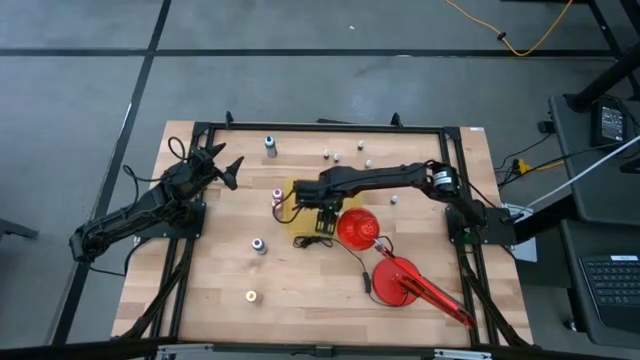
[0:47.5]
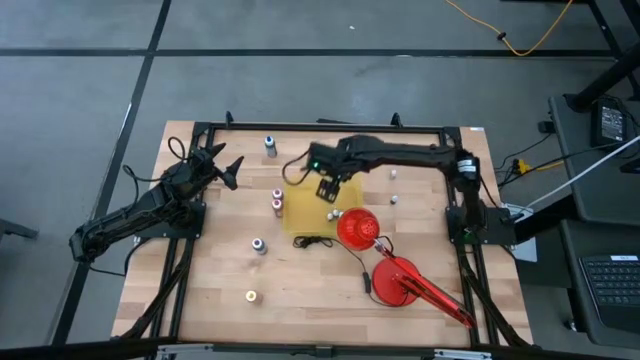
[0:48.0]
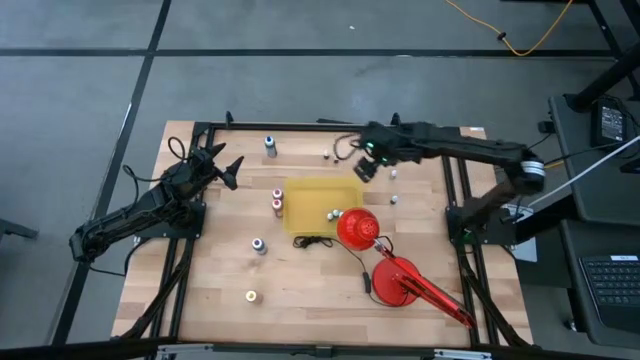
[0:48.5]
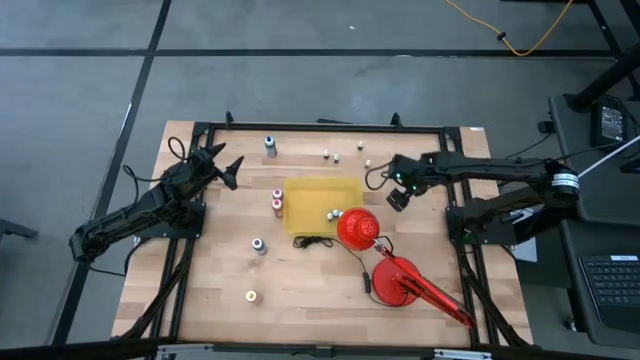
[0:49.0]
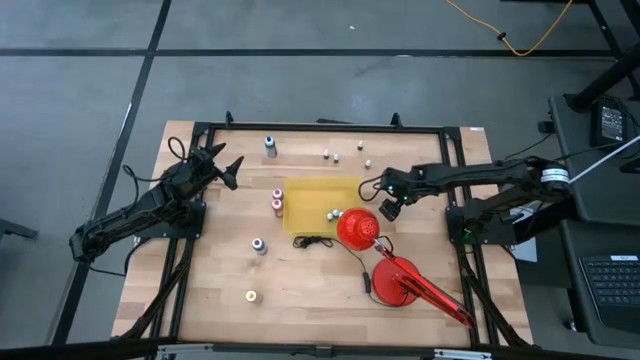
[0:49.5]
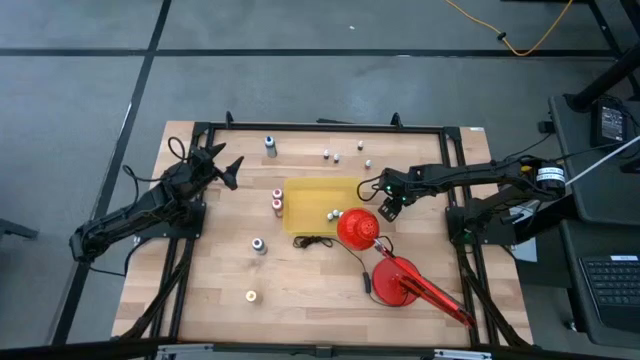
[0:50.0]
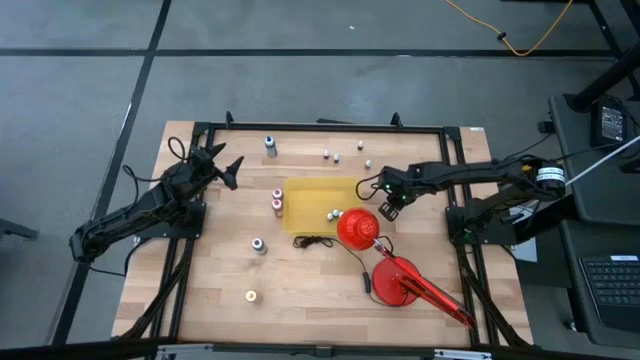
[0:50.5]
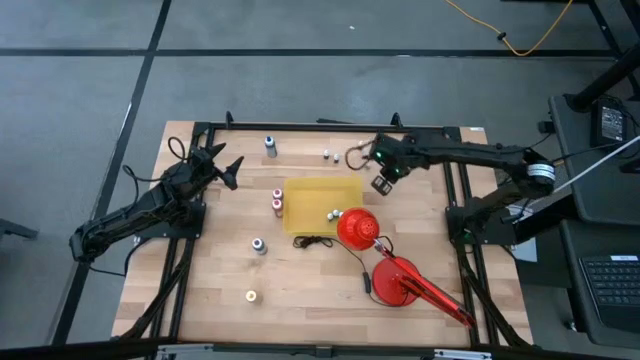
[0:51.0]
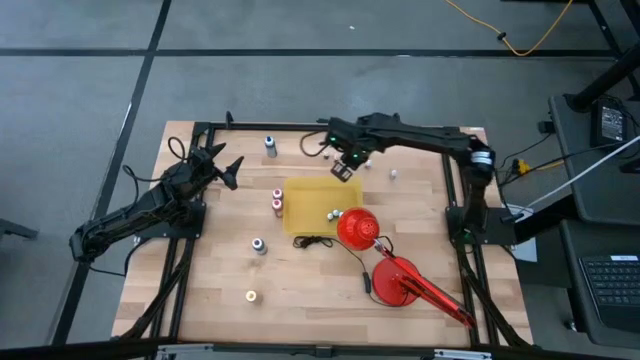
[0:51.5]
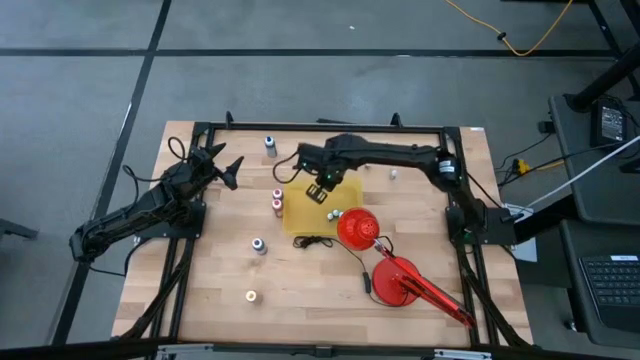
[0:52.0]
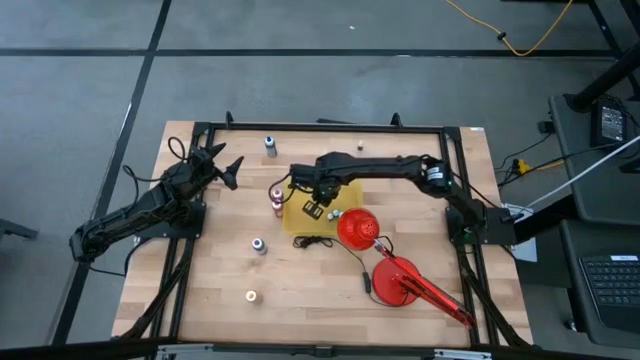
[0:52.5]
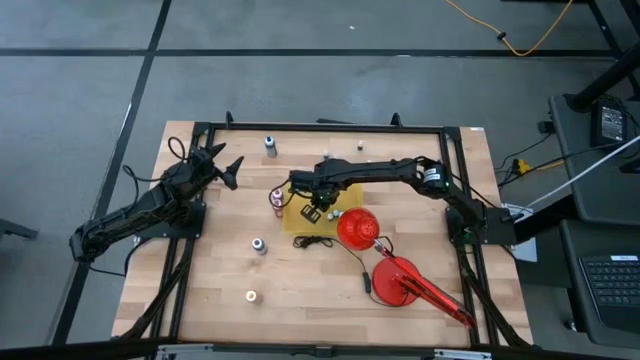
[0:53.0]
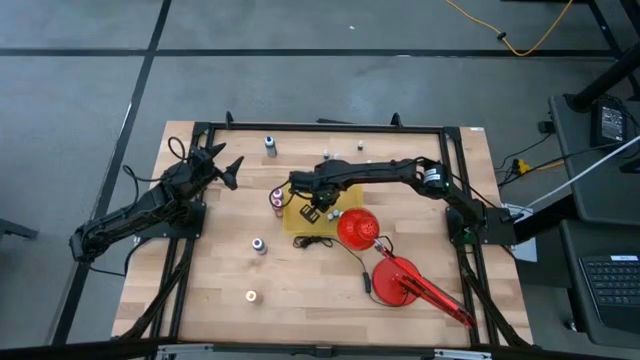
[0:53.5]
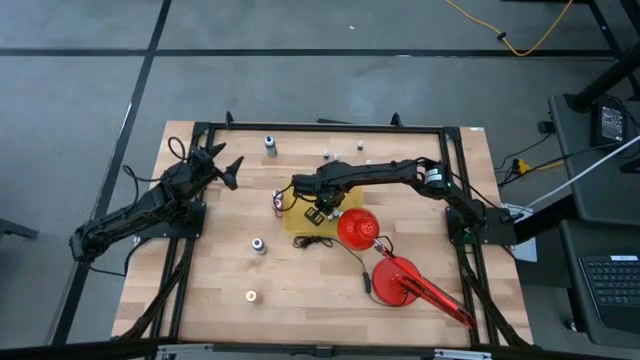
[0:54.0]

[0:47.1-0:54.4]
Task: Pick & Place food coloring
Put the bottom small blue food coloring bottle into the yellow container

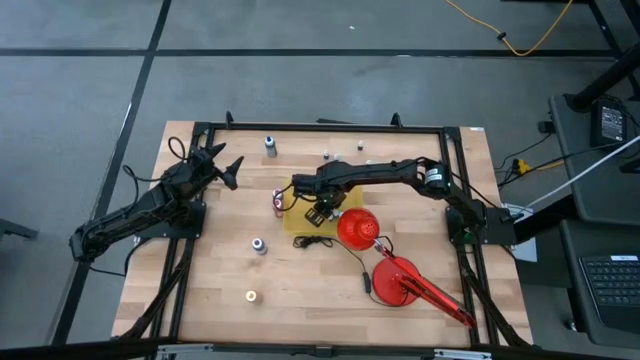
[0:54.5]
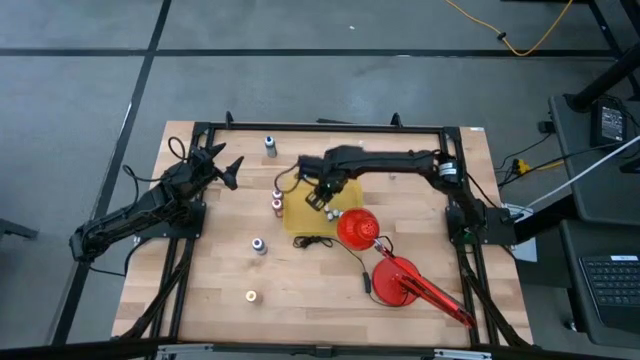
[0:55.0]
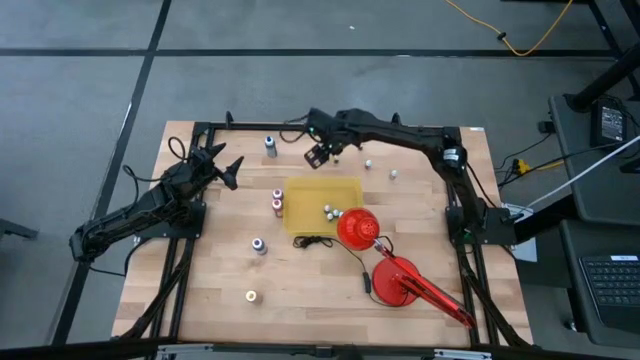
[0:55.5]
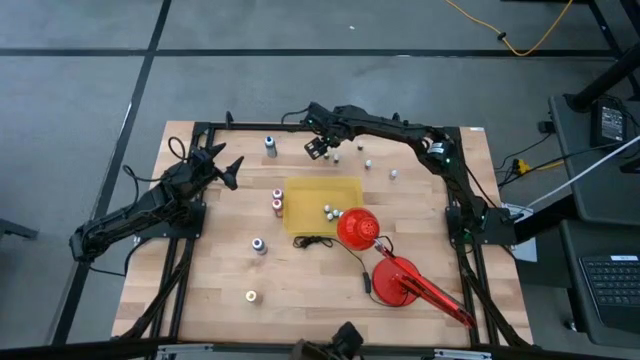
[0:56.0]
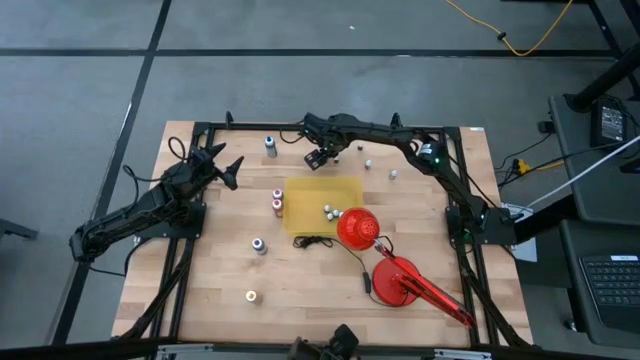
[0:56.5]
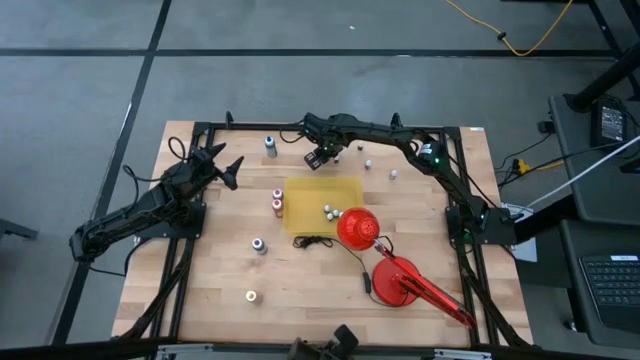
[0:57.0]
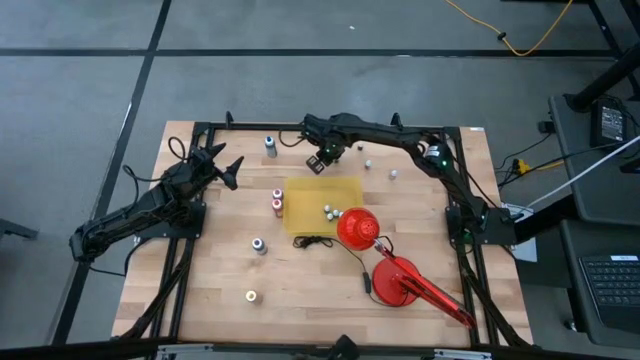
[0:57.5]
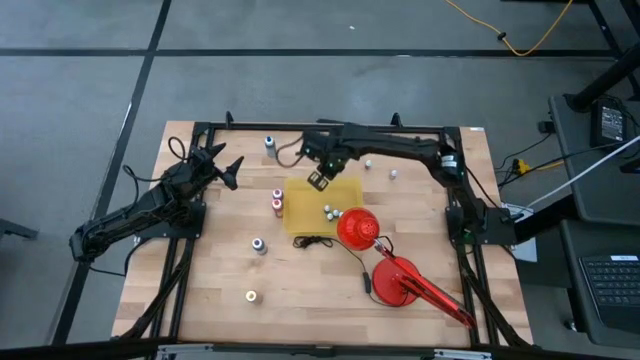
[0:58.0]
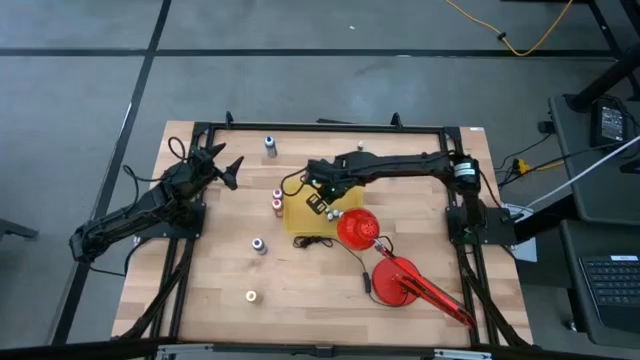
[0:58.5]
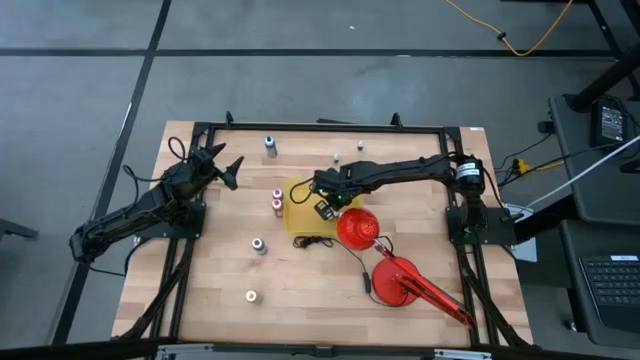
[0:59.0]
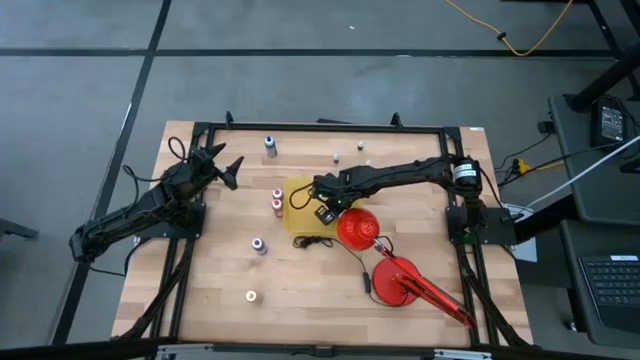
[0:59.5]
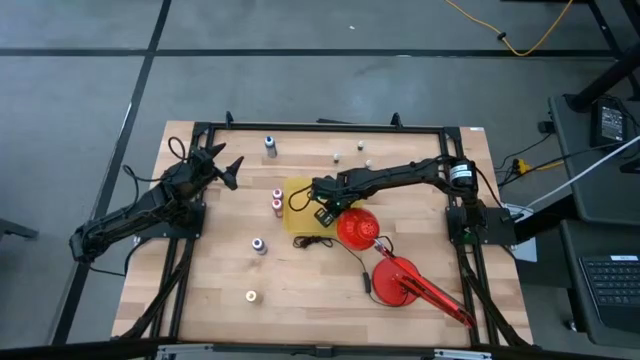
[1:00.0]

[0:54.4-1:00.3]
Put the small pink food coloring bottle into the yellow container

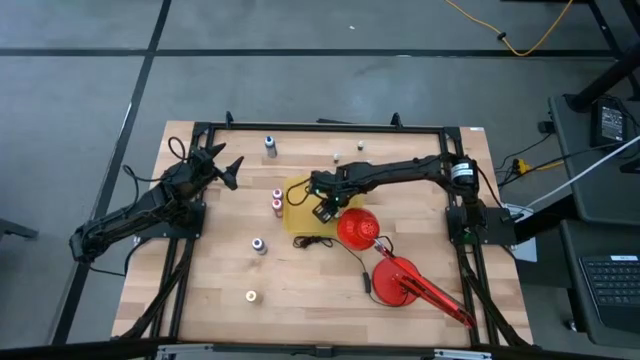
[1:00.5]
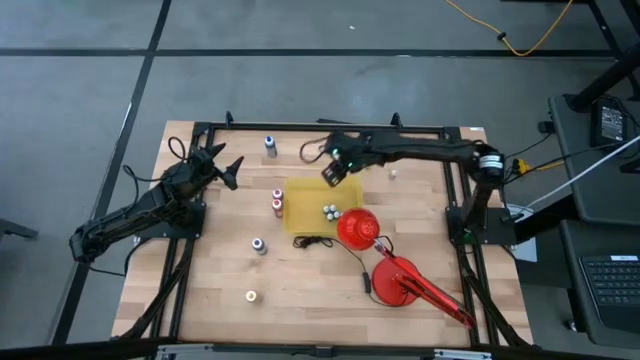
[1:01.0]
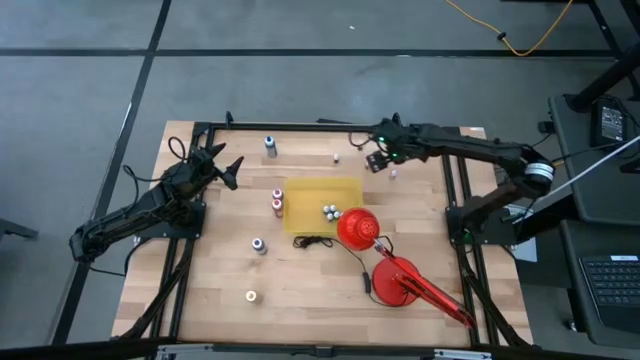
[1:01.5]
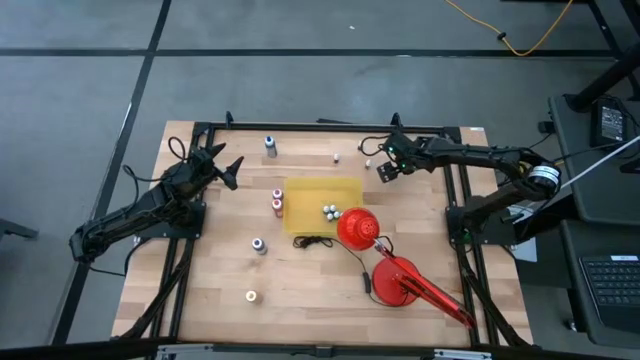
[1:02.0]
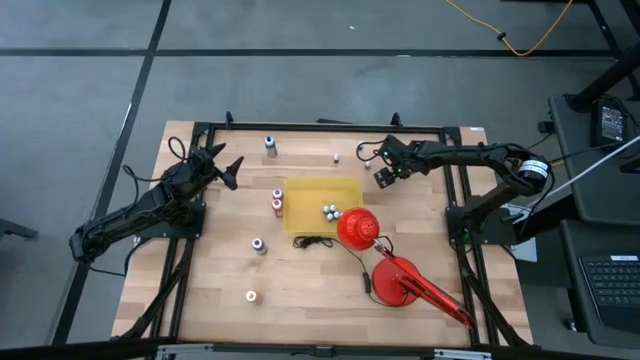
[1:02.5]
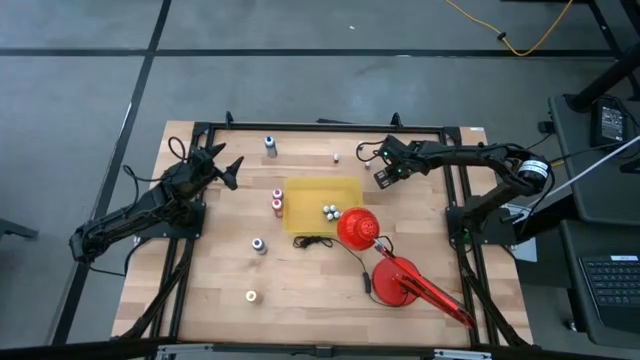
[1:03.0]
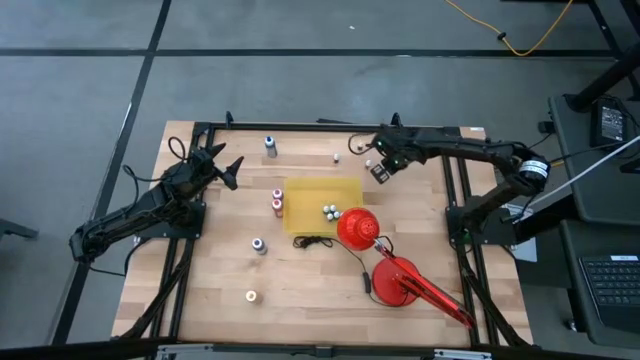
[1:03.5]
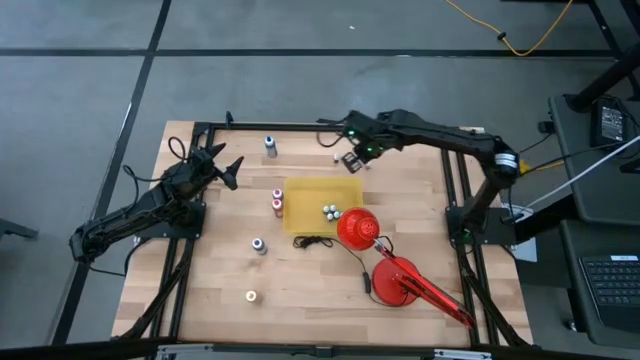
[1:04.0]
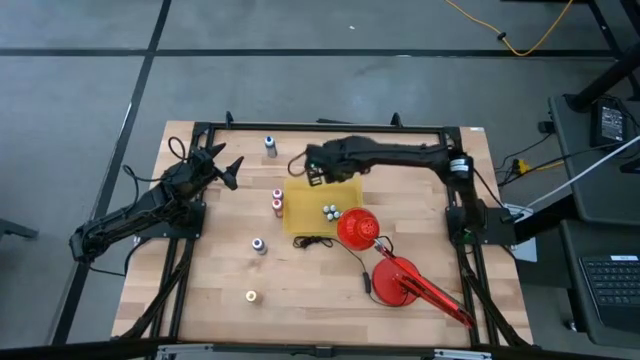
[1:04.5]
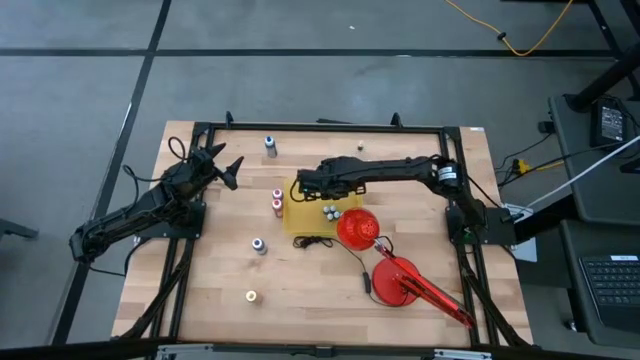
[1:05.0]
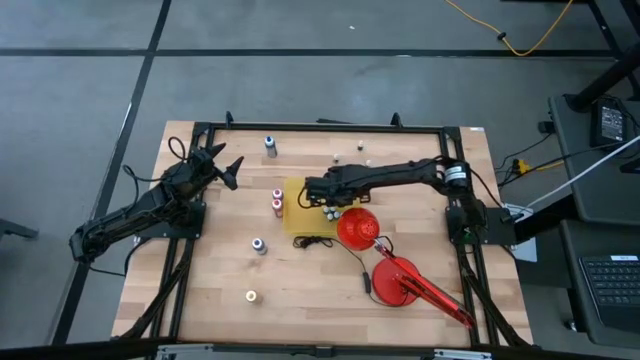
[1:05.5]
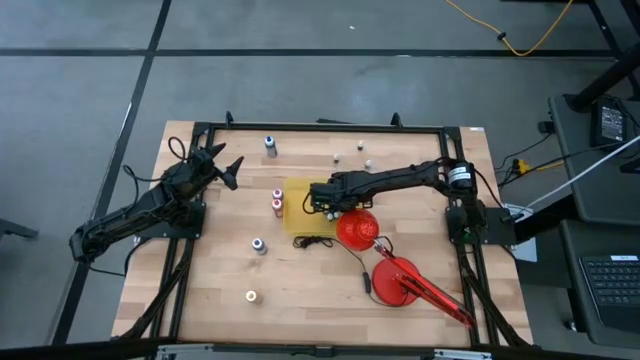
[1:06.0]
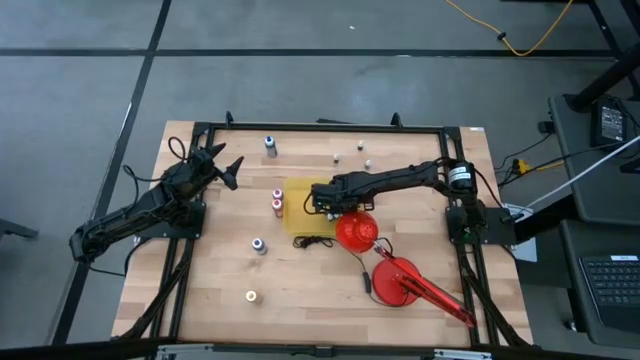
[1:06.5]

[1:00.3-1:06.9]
Put the small blue food coloring bottle into the yellow container

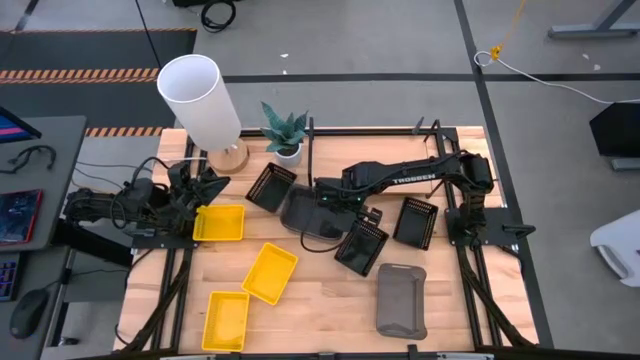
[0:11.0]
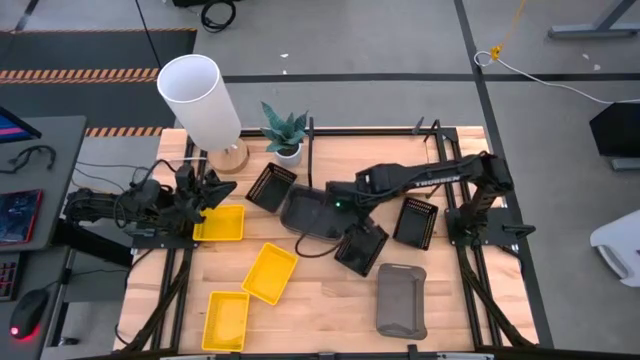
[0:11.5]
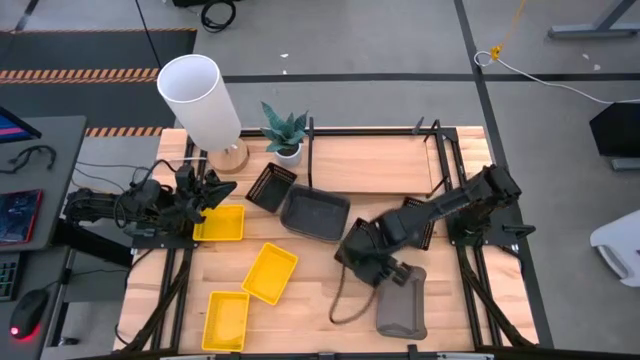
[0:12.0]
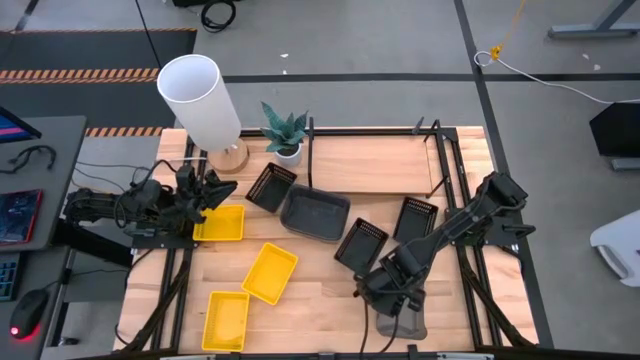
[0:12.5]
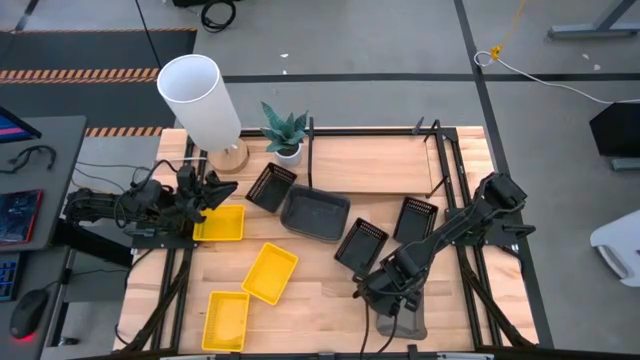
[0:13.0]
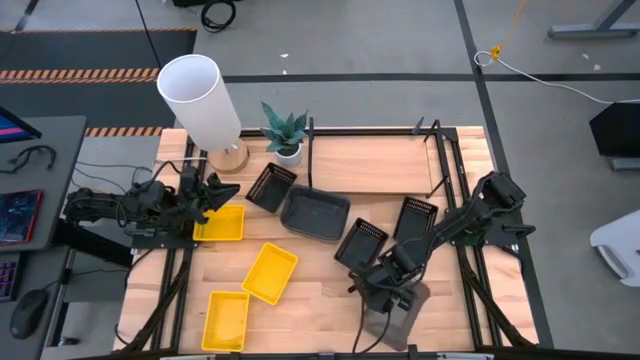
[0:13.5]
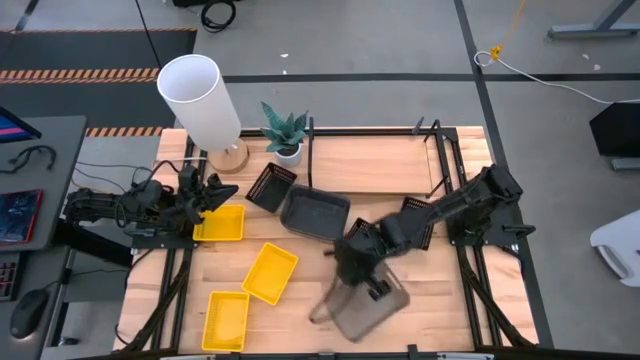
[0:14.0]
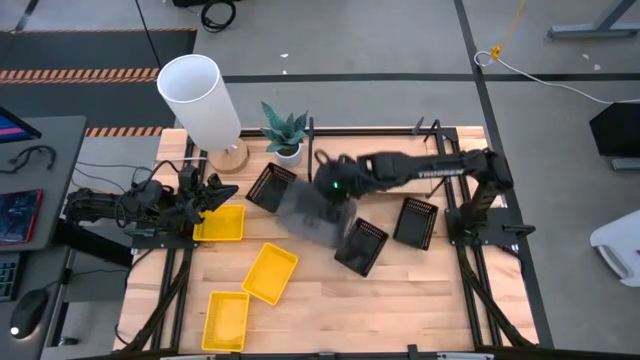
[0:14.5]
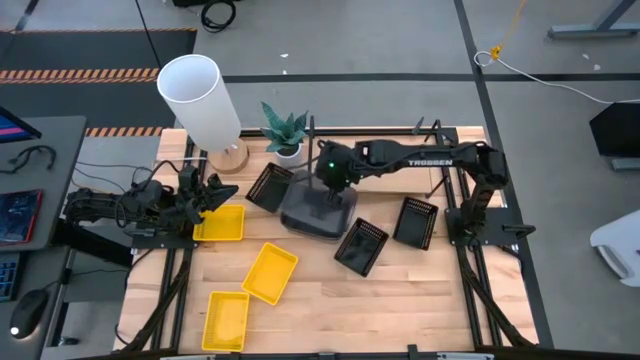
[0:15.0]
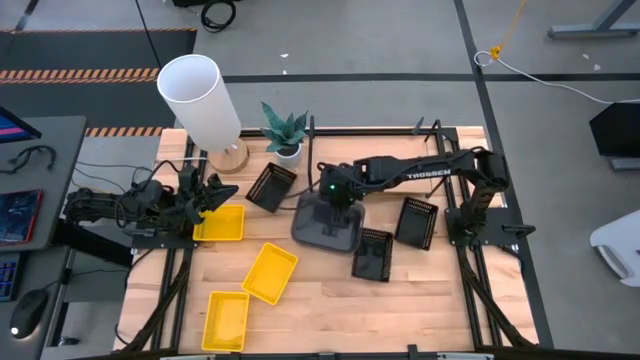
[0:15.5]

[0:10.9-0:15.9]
Task: Stack baskets on shelf by color
Stack the gray bin on top of the other gray bins
